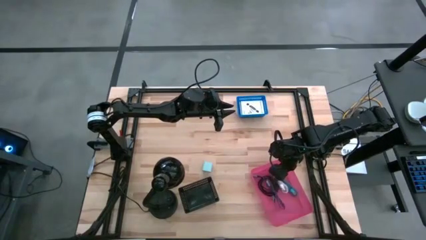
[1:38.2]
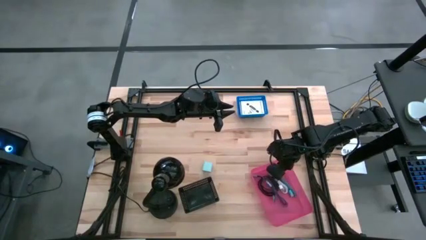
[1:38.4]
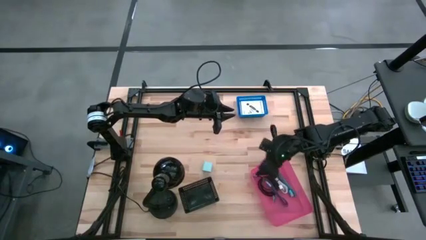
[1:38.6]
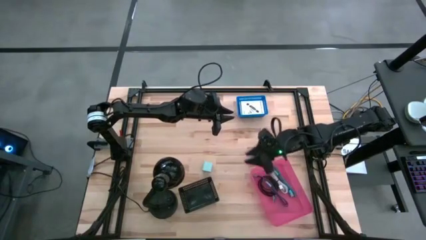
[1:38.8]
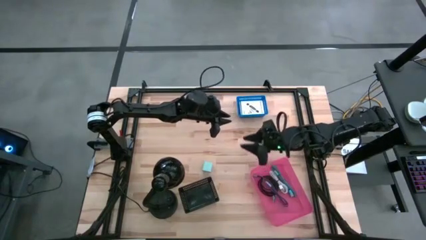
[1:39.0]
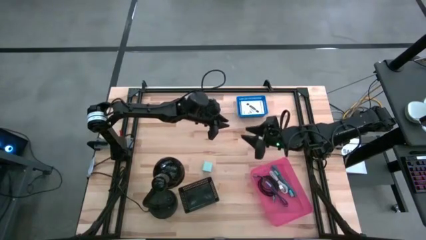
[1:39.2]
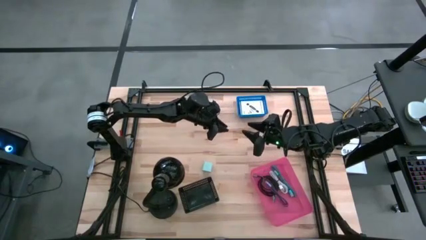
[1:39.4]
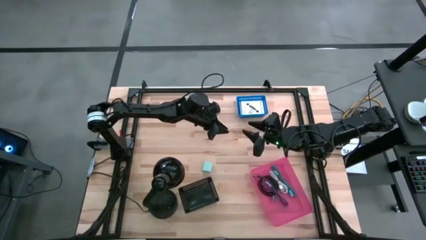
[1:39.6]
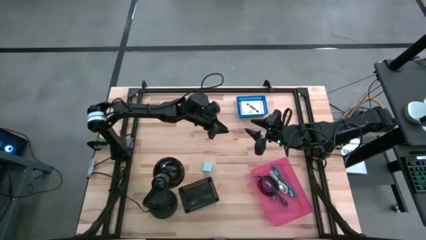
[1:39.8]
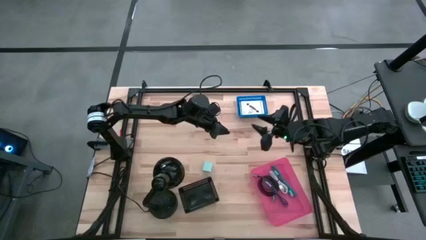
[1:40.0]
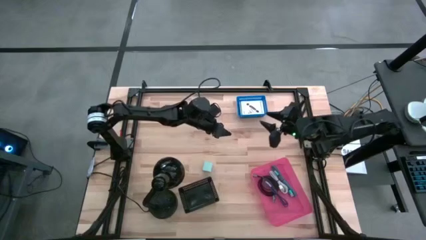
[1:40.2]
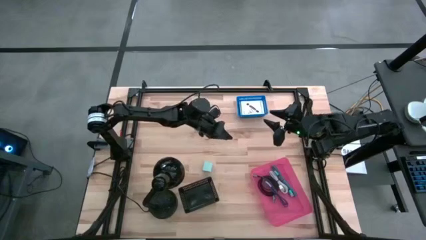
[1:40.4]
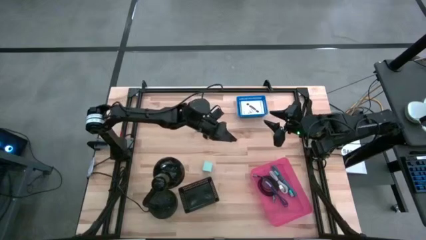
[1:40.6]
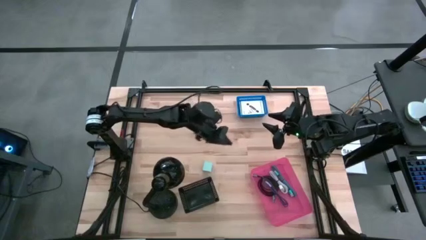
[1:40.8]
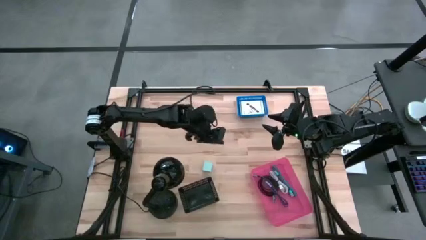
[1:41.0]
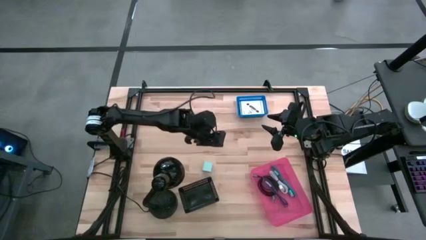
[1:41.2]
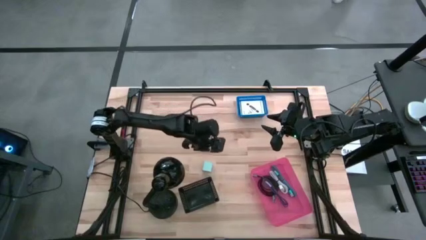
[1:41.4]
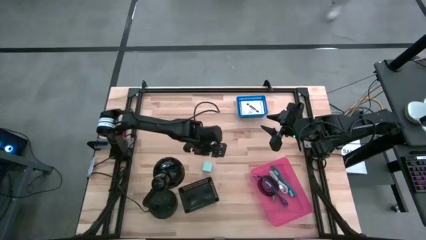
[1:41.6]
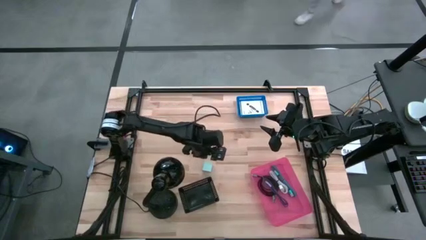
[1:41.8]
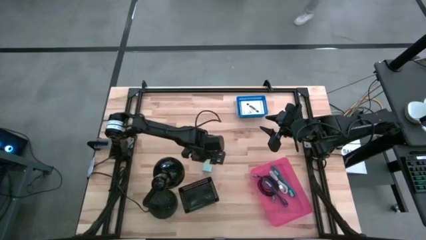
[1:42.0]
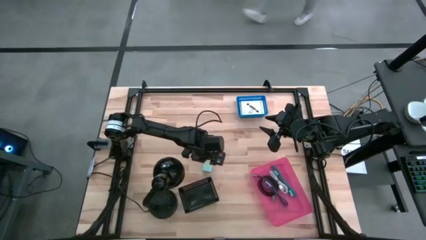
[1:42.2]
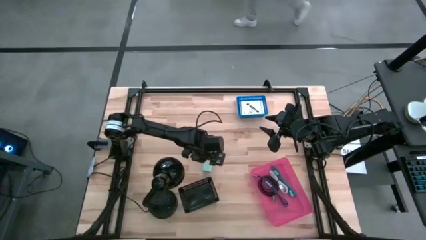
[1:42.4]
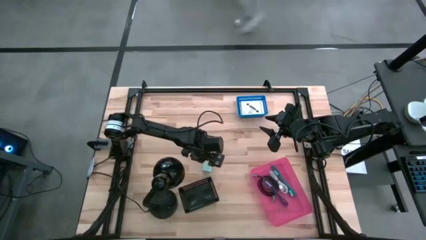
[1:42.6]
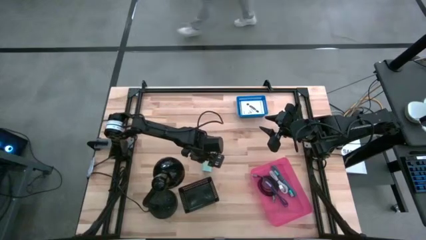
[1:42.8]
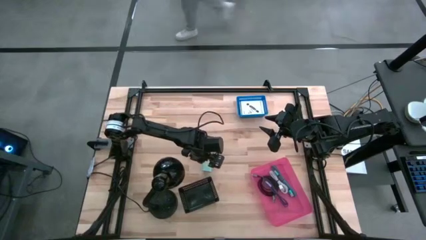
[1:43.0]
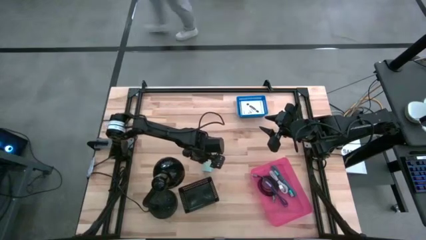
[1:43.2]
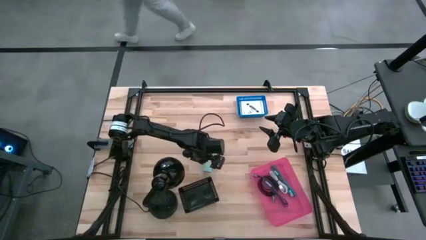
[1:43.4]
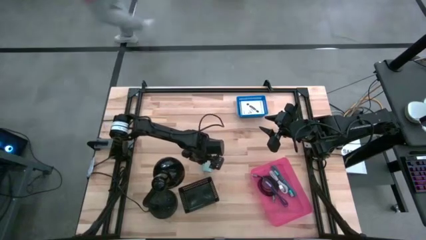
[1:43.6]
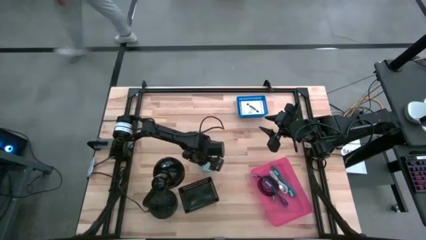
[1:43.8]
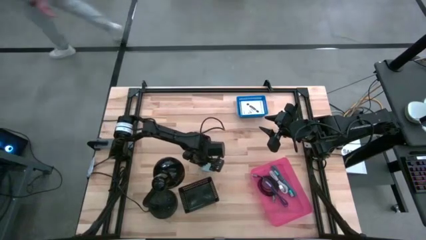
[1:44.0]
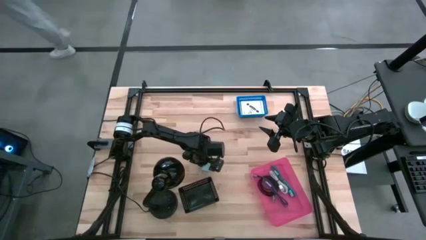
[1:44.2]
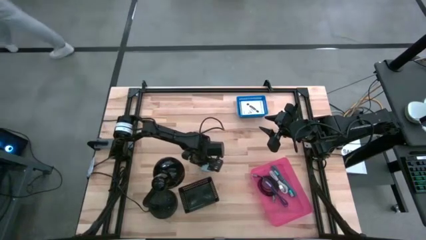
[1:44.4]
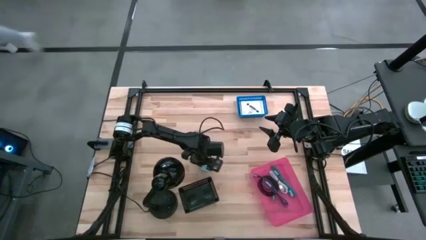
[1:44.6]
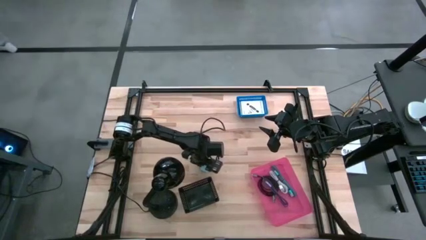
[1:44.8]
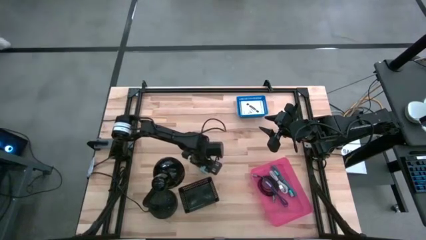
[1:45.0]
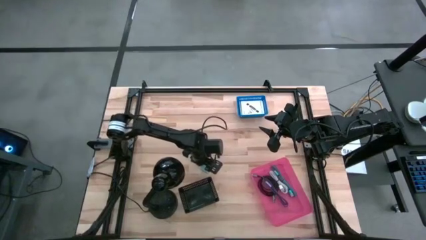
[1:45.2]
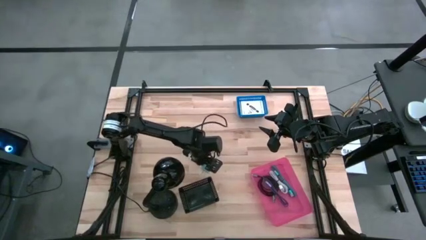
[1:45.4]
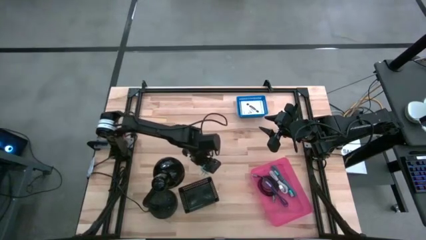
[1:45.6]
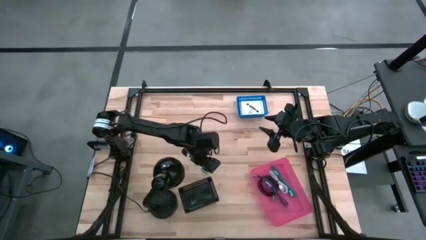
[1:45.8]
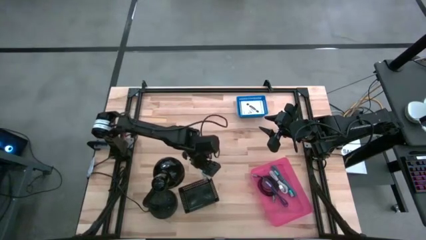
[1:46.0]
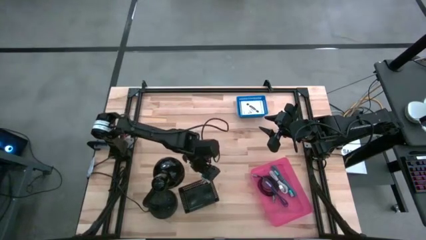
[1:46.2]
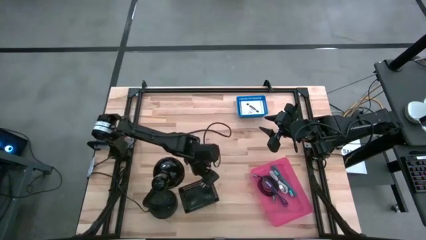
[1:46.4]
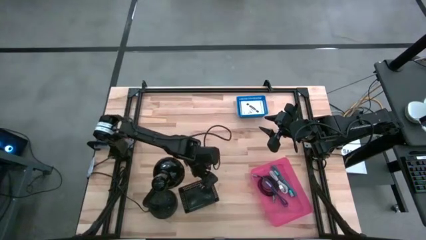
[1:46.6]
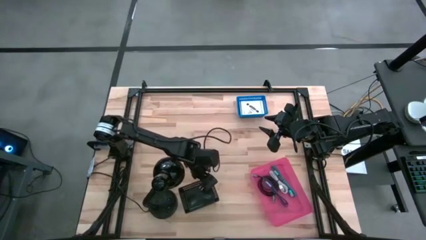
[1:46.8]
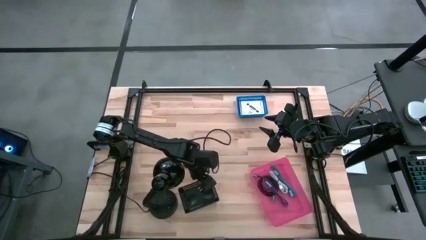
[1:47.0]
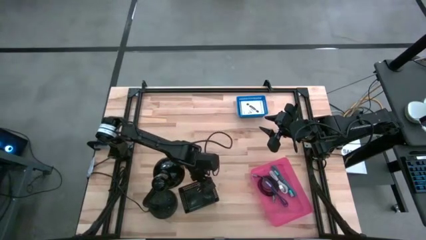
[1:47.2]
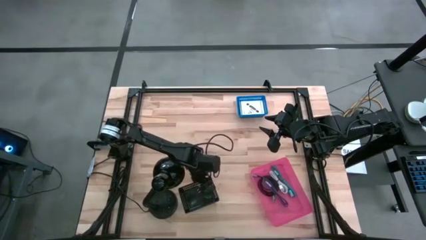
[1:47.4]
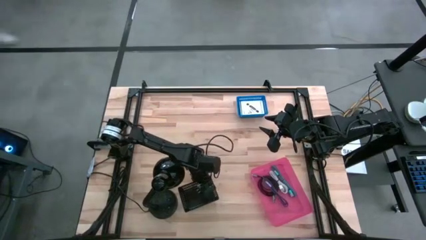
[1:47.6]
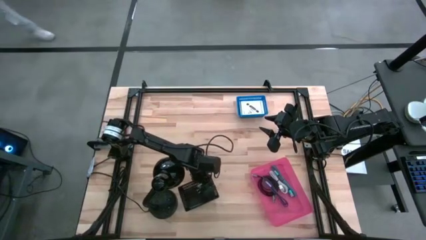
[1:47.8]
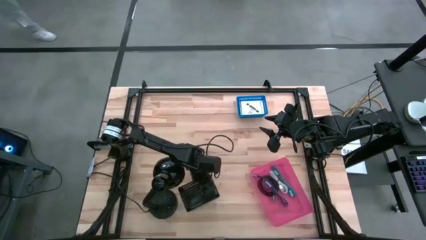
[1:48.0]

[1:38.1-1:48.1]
Task: Pick and place items into bin
Put the white charger adapter into the black bin

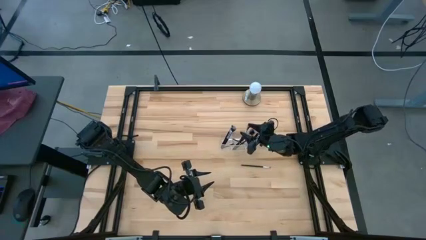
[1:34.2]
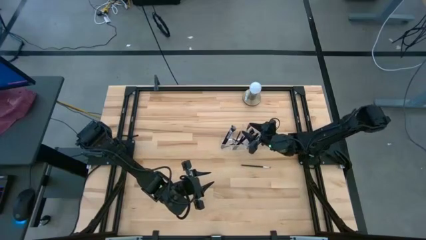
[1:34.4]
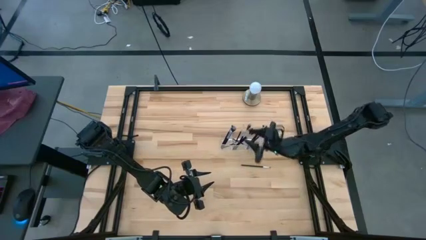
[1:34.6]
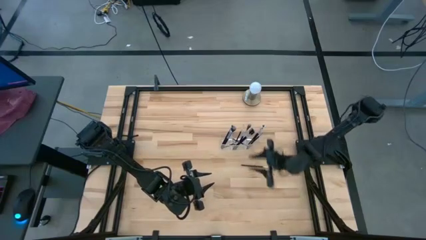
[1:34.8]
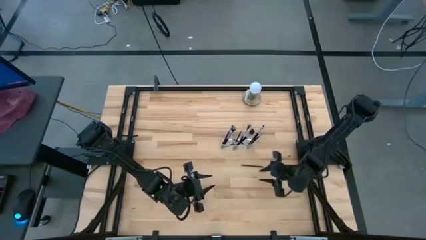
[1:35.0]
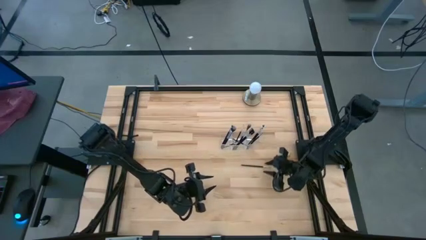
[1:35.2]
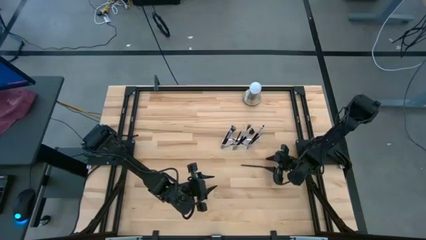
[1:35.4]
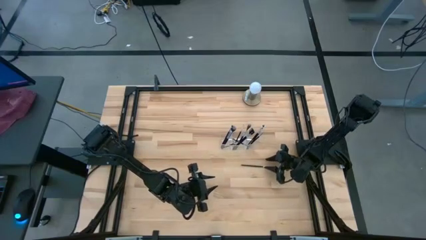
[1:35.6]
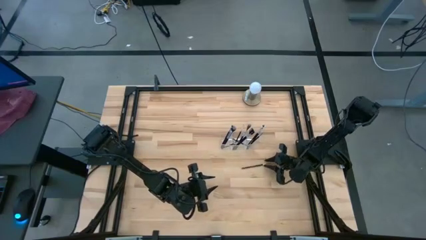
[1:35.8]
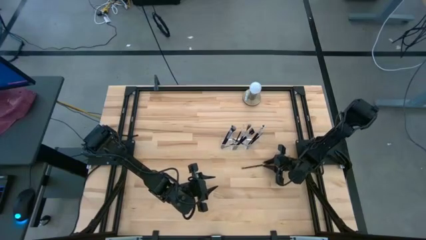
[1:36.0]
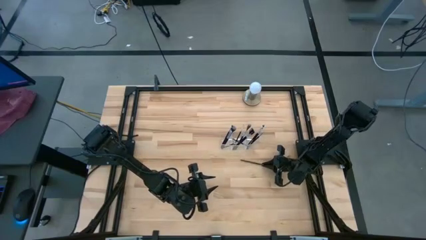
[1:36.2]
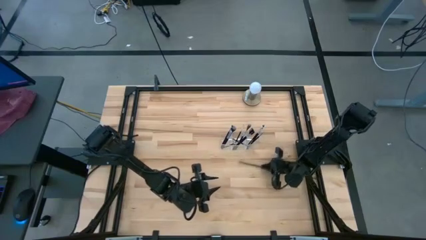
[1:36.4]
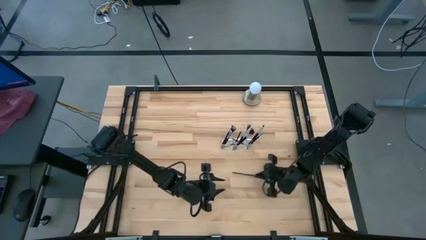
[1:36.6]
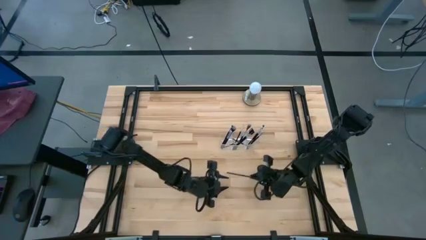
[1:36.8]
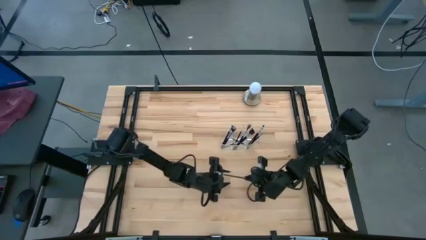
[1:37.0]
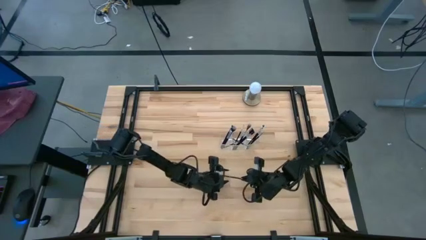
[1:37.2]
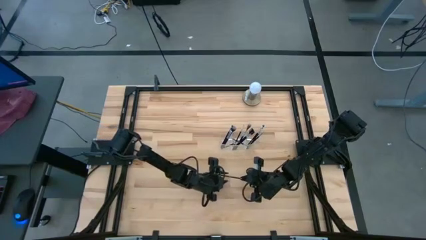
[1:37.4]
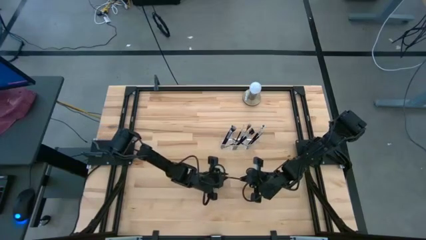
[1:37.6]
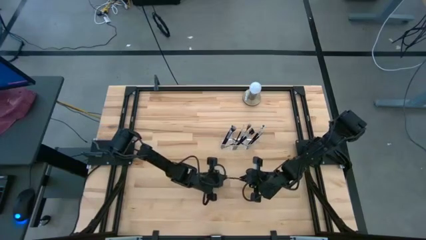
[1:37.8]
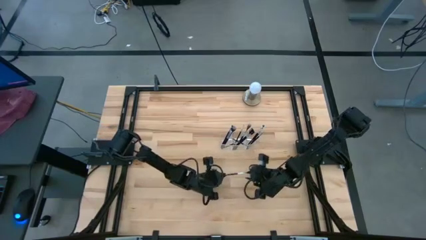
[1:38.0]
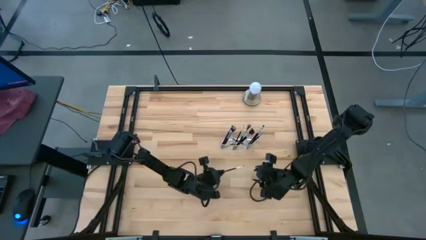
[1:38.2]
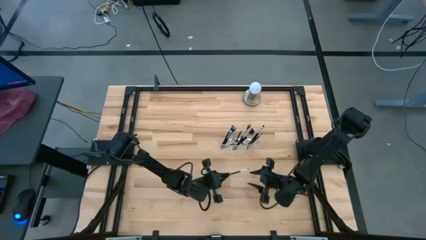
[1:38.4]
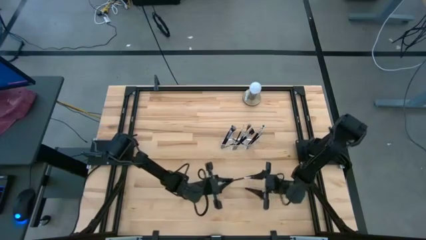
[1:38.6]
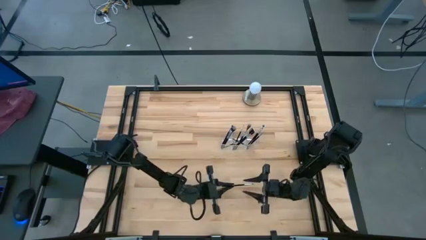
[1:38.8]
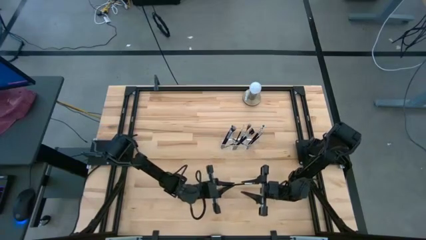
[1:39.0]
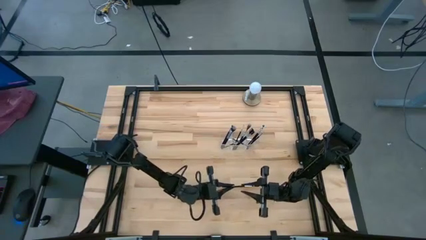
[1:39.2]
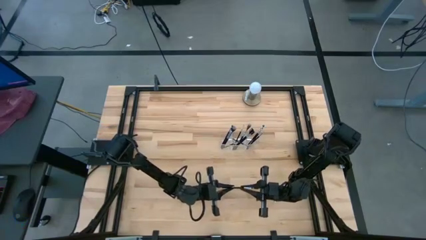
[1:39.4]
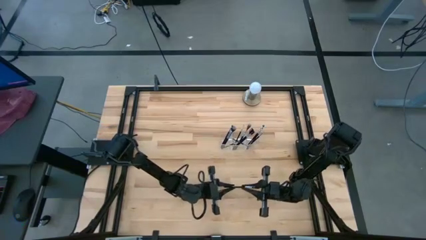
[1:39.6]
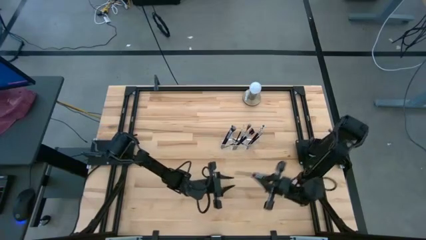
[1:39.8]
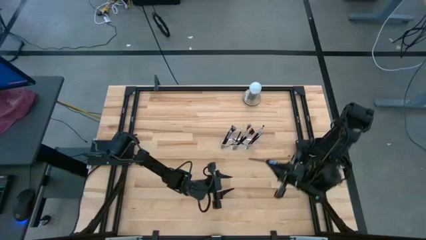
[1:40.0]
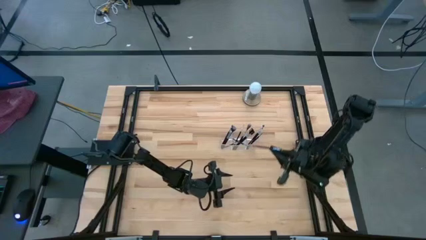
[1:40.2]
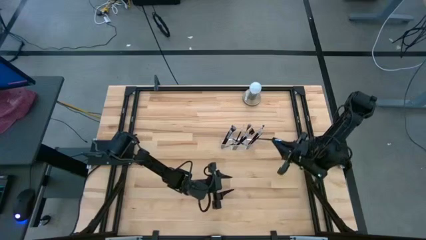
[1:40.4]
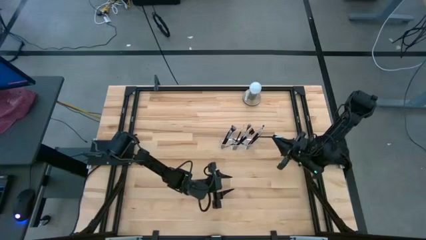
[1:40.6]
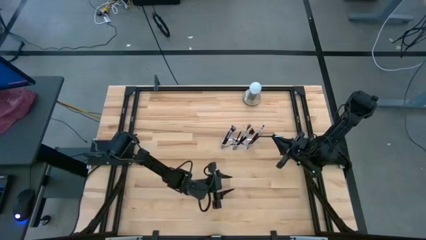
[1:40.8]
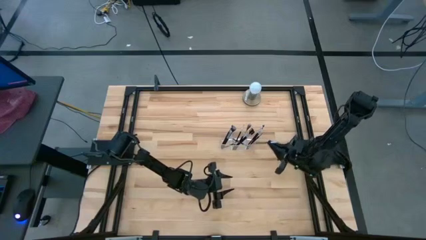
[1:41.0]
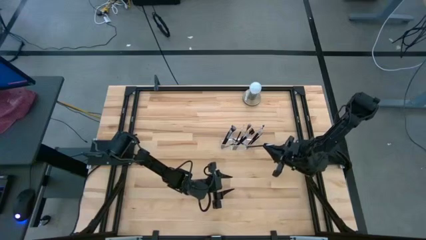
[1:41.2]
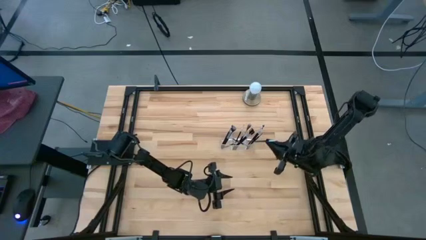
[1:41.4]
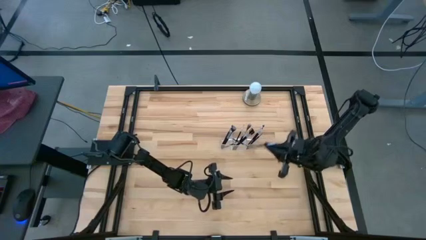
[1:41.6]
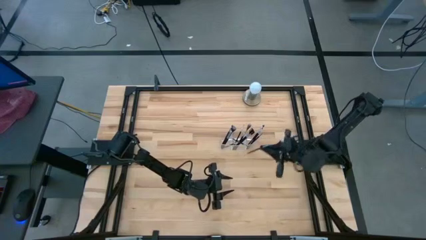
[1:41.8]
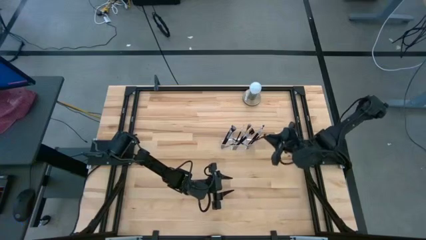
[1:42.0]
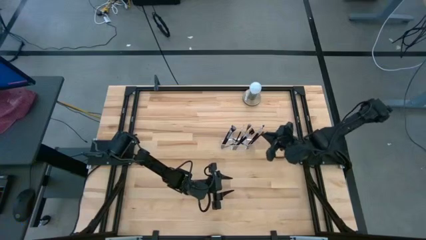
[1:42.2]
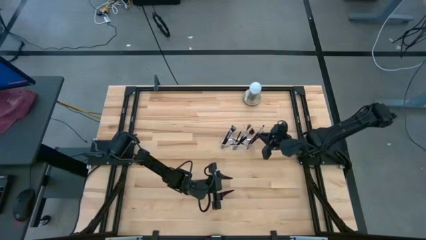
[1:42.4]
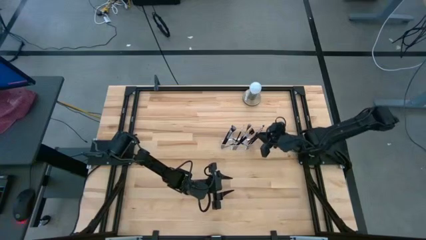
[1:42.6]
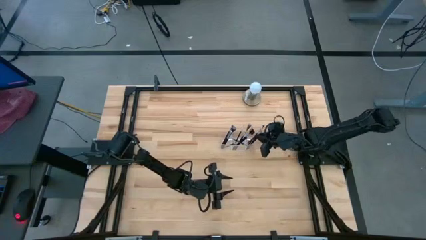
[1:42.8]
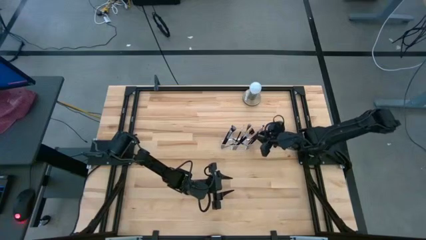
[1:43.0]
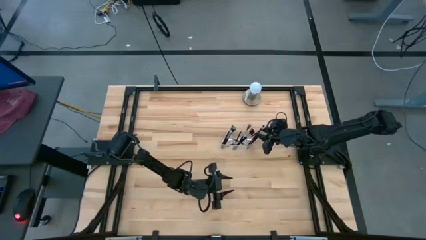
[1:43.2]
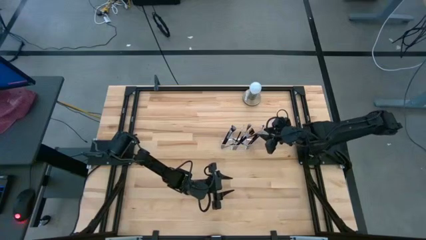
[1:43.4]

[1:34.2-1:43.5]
Task: Put items in baskets/containers
Put the black eyeshadow brush into the transparent organizer
